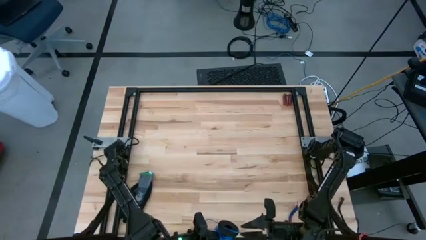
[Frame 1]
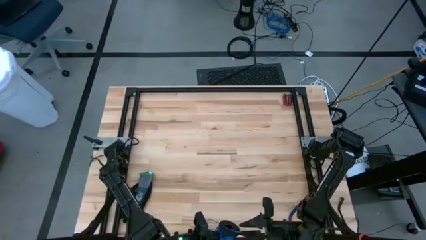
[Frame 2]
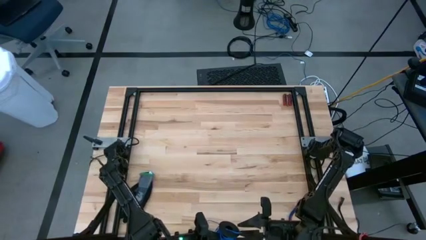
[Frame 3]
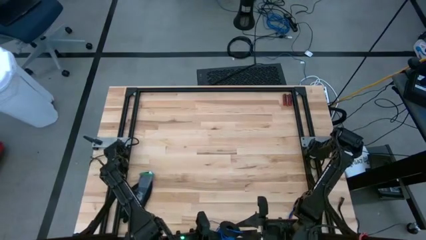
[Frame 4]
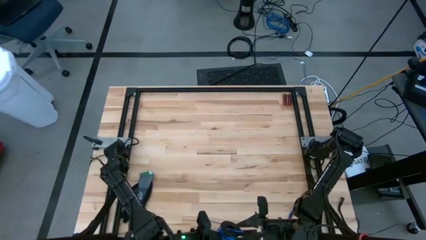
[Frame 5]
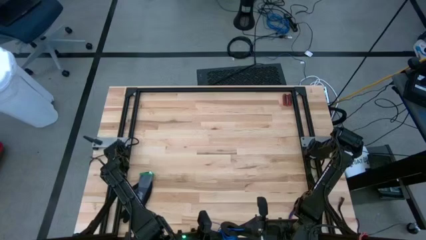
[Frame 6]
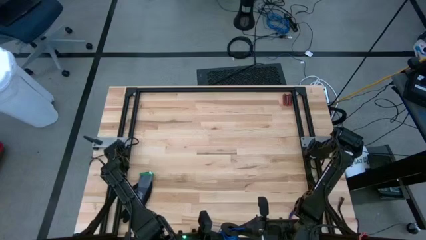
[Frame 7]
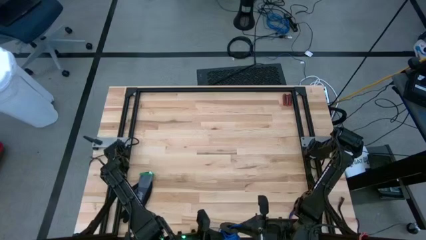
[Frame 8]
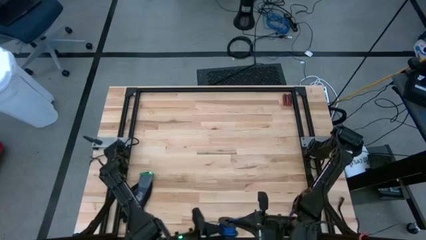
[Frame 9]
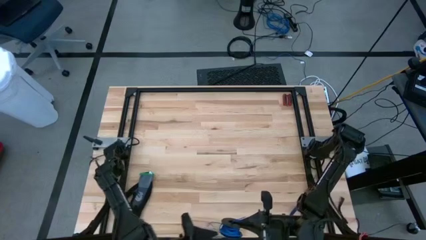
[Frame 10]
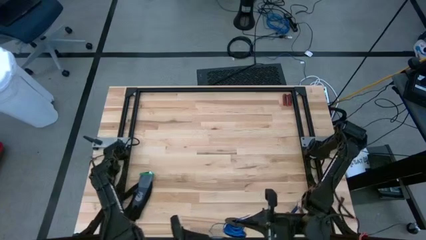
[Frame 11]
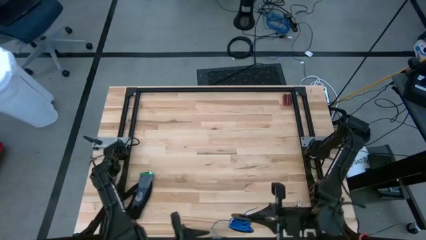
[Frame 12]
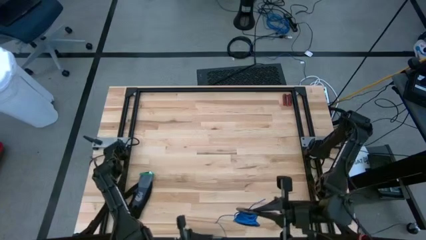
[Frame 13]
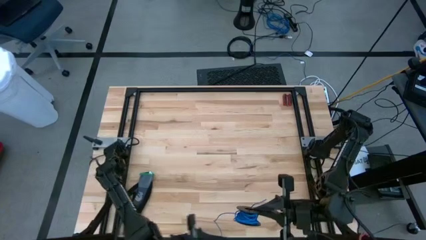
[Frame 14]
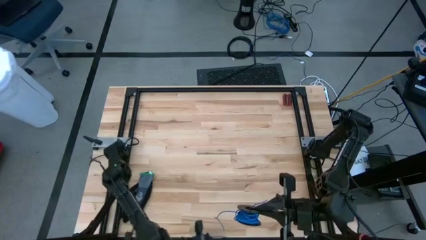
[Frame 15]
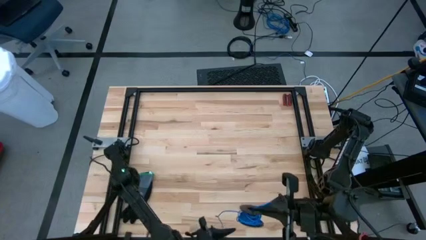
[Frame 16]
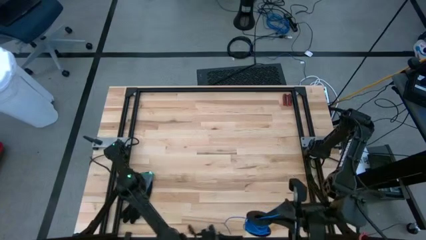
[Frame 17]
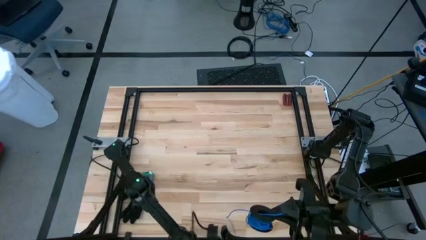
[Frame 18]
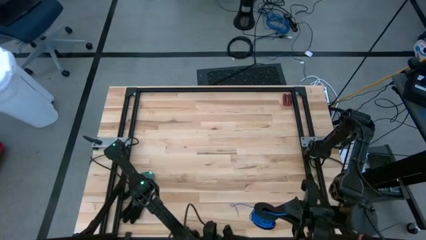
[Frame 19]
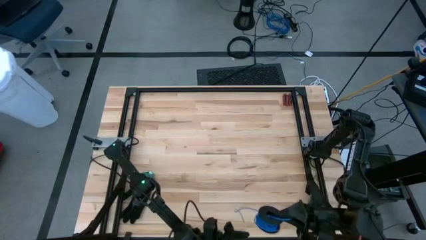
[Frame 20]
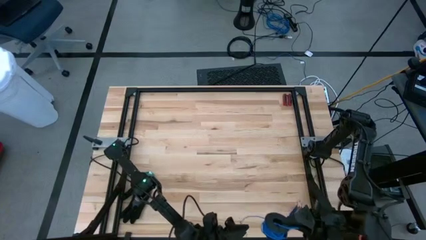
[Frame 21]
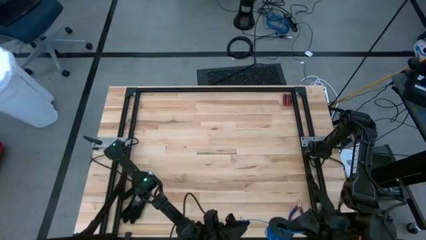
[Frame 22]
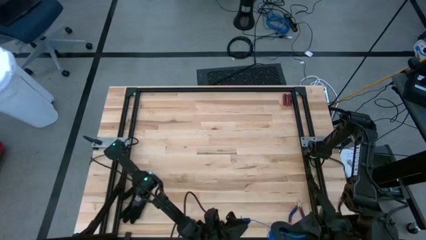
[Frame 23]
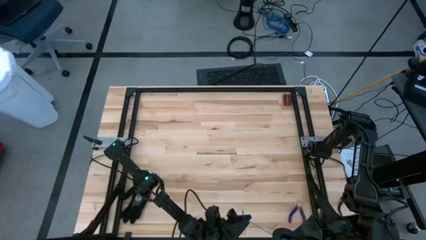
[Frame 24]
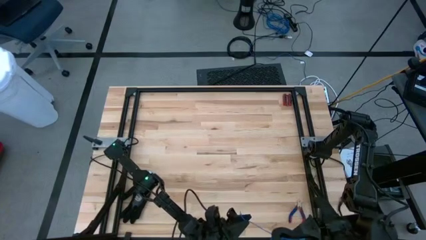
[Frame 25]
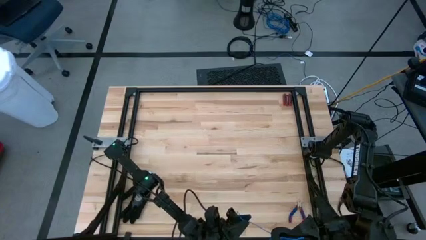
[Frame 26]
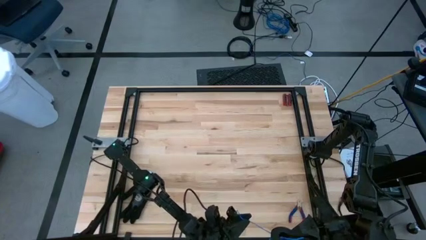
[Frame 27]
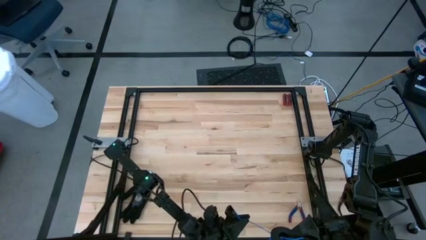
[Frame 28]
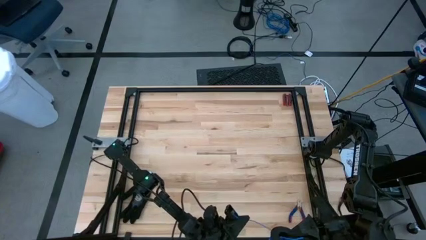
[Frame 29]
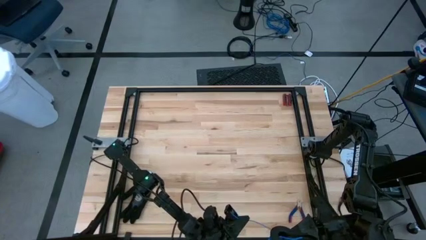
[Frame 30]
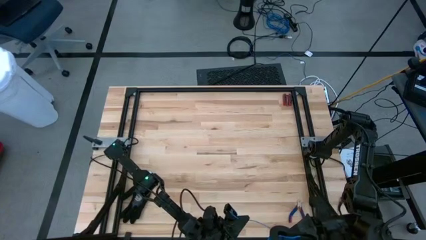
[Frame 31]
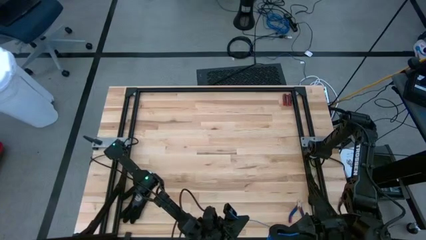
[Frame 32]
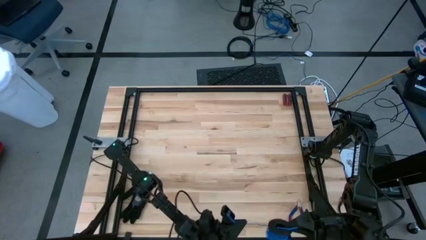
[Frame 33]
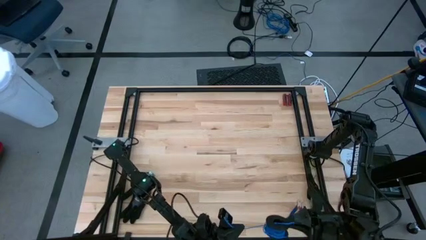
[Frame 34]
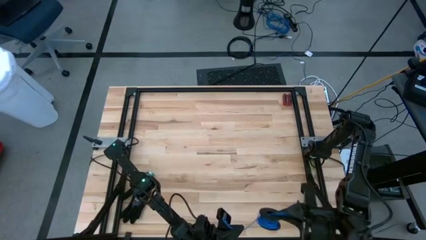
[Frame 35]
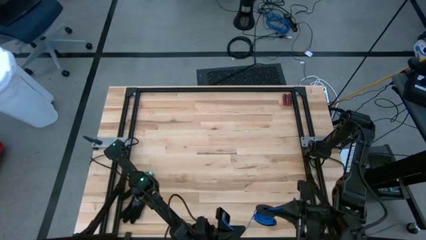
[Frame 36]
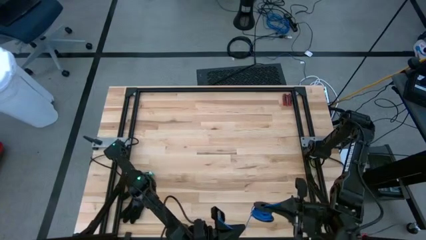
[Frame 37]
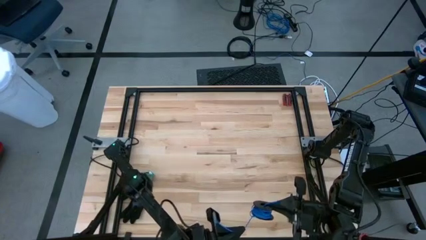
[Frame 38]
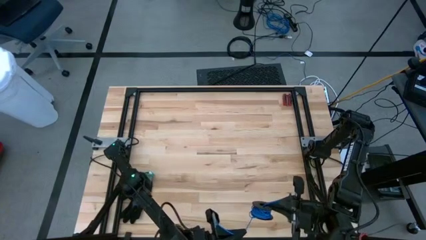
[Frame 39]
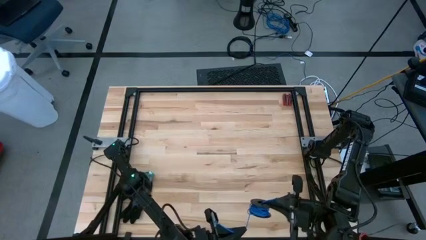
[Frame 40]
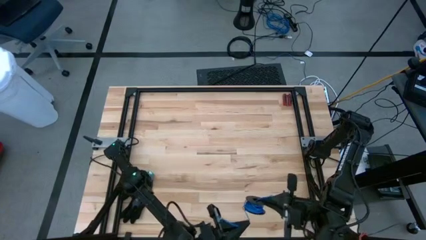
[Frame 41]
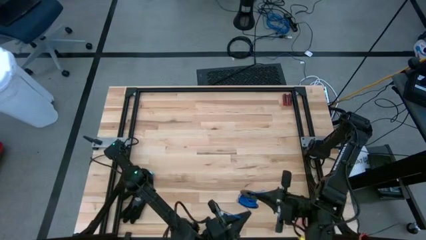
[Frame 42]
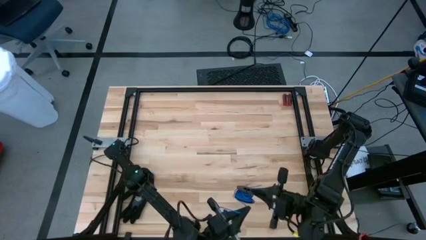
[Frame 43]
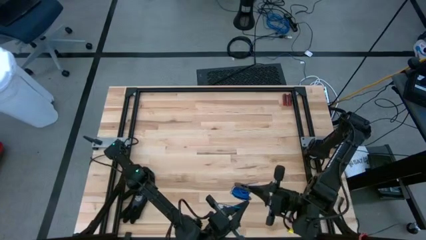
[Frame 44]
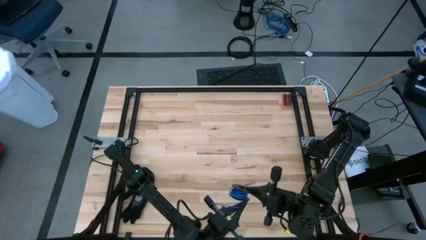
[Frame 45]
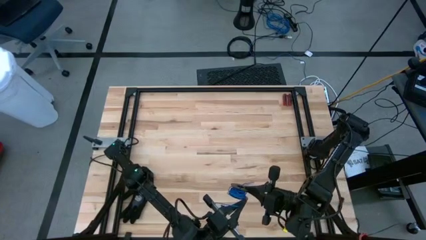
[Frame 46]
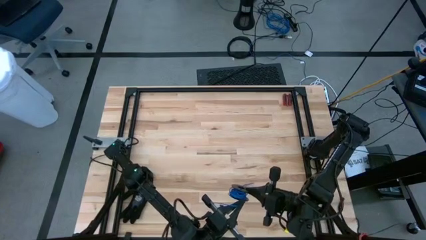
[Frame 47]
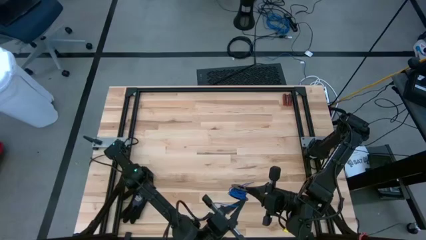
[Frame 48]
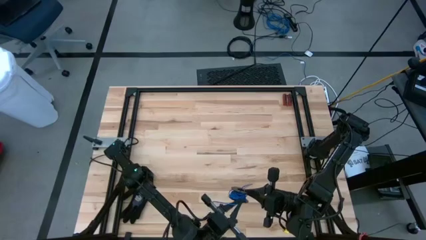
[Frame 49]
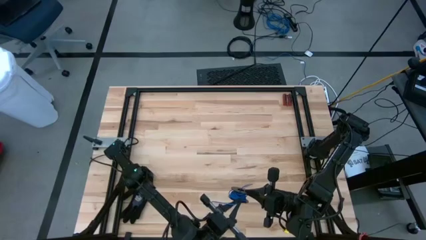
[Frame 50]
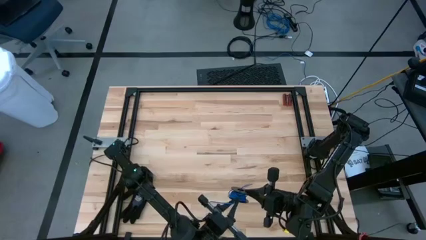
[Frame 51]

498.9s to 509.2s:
Task: Coil cords
Coil the blue wire onto the spool

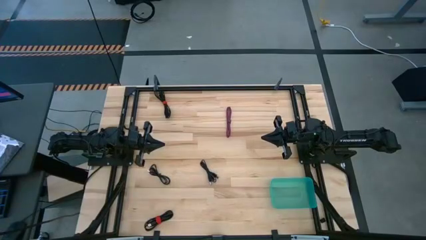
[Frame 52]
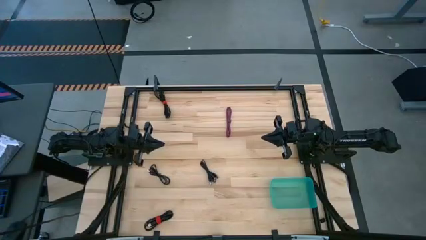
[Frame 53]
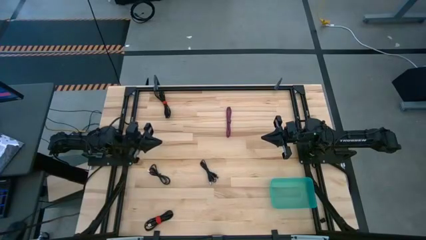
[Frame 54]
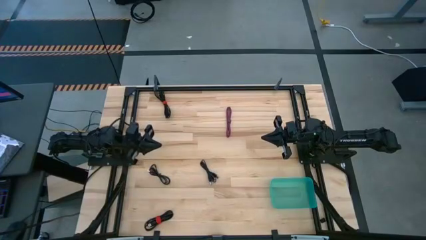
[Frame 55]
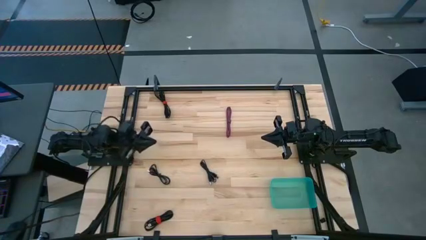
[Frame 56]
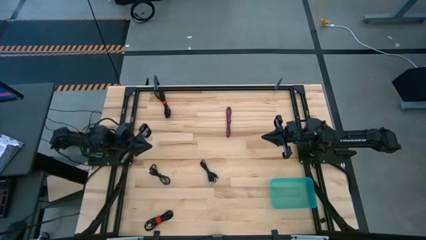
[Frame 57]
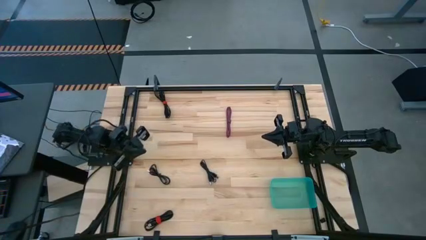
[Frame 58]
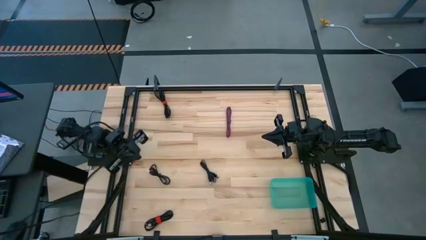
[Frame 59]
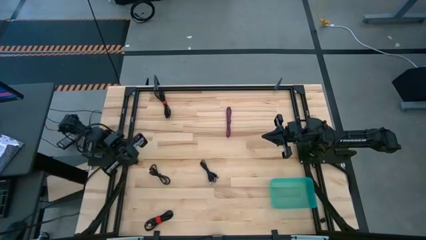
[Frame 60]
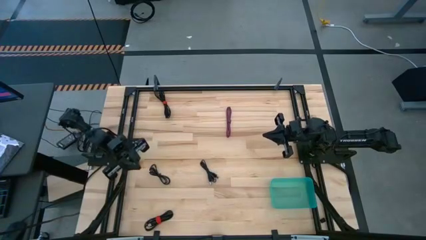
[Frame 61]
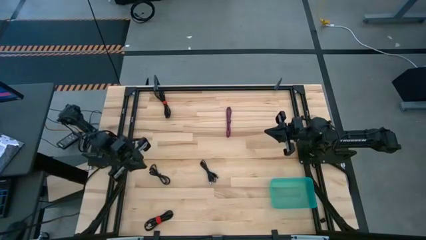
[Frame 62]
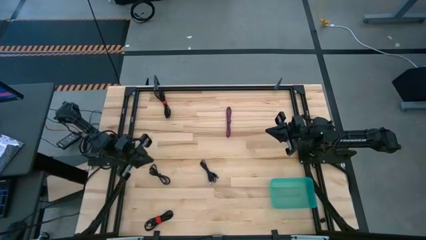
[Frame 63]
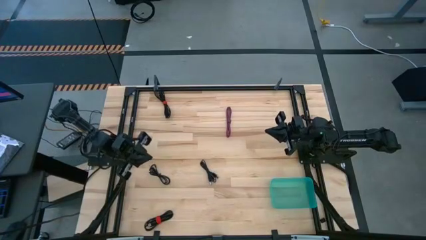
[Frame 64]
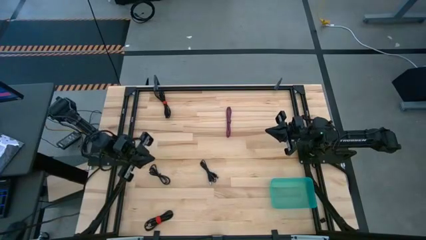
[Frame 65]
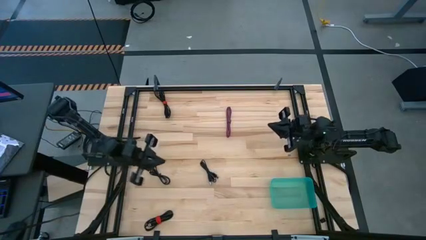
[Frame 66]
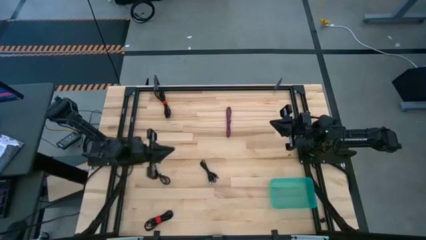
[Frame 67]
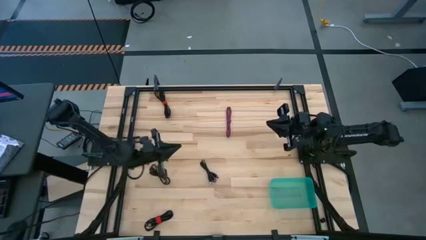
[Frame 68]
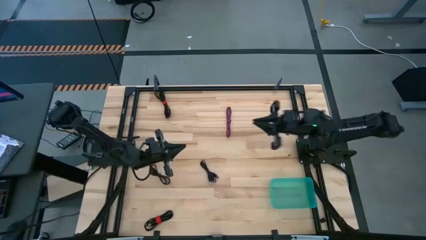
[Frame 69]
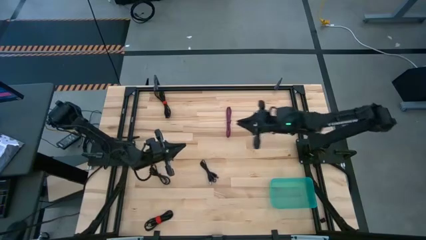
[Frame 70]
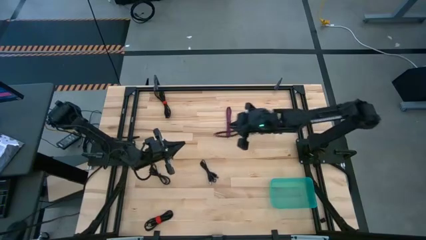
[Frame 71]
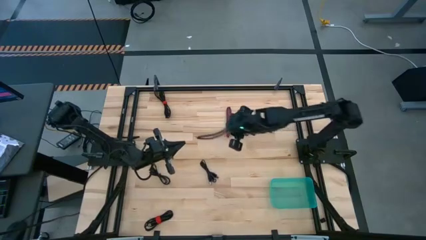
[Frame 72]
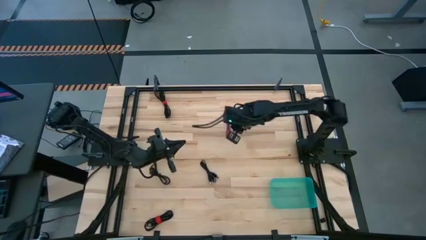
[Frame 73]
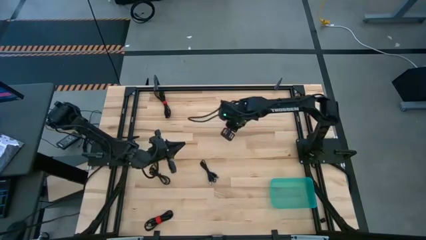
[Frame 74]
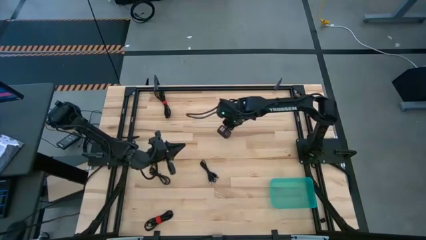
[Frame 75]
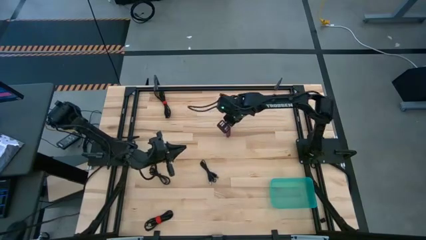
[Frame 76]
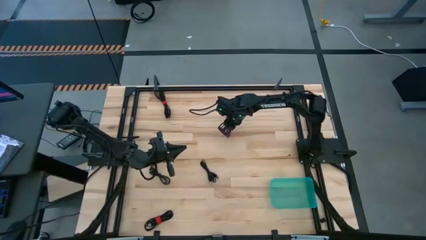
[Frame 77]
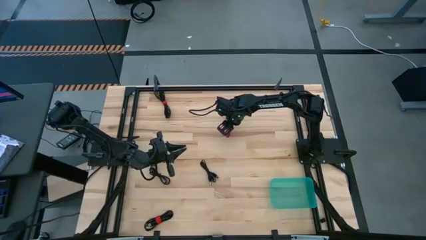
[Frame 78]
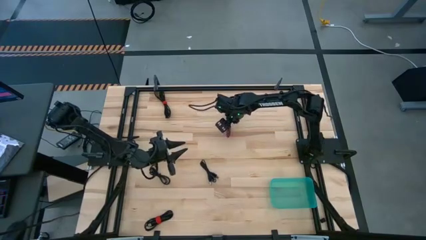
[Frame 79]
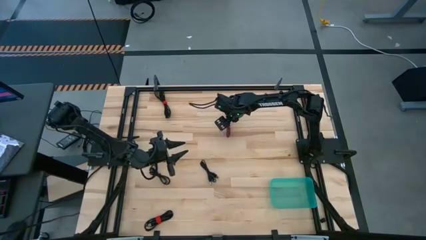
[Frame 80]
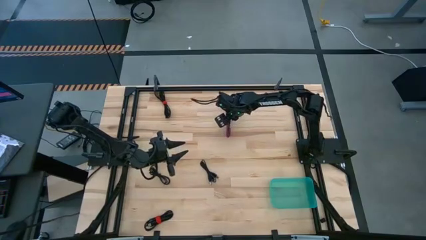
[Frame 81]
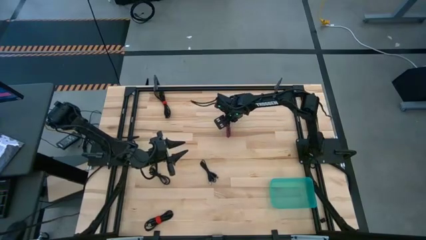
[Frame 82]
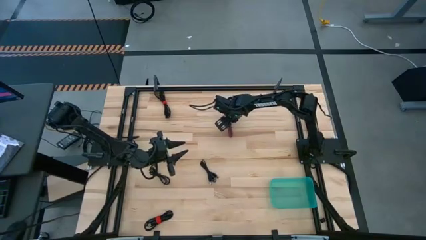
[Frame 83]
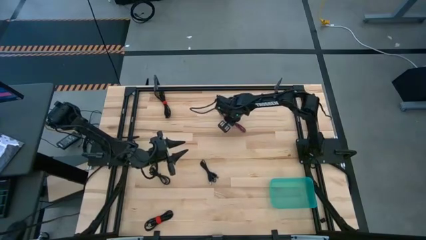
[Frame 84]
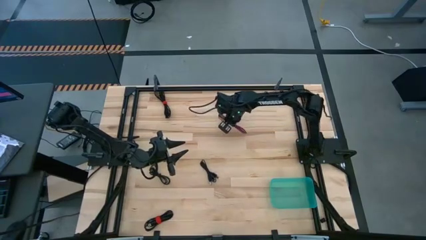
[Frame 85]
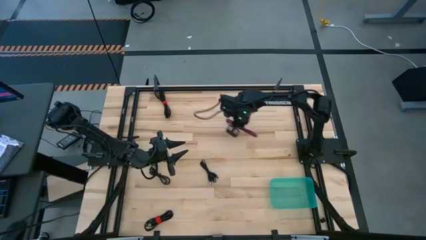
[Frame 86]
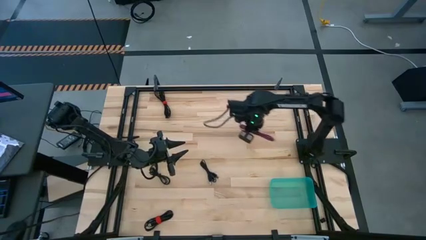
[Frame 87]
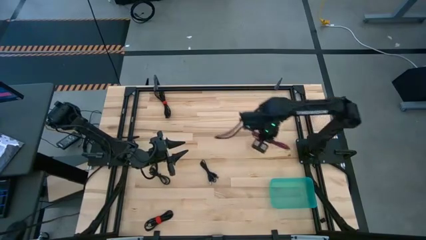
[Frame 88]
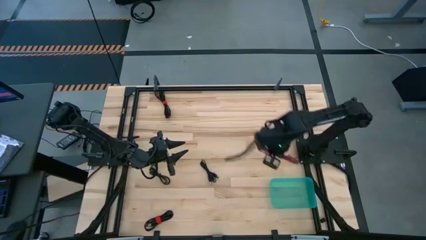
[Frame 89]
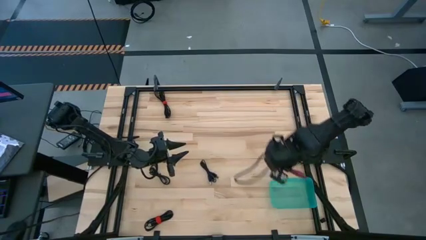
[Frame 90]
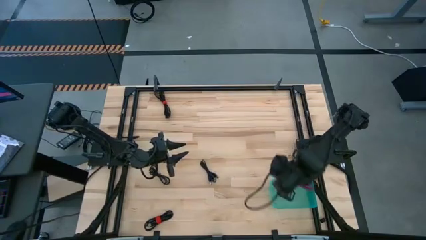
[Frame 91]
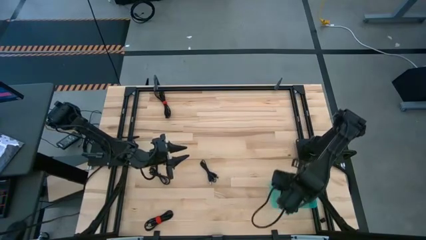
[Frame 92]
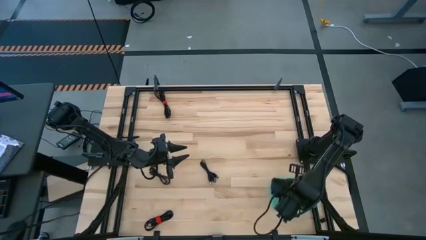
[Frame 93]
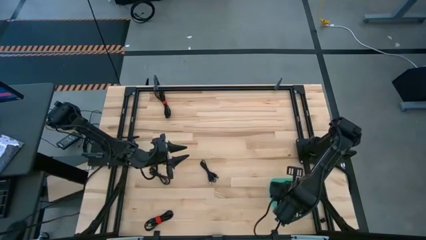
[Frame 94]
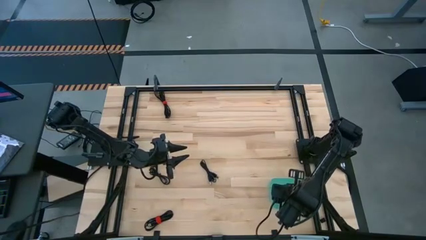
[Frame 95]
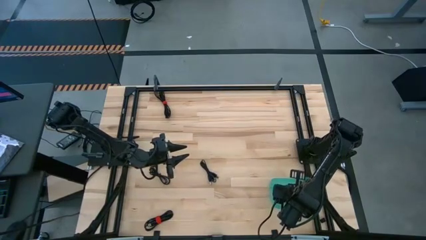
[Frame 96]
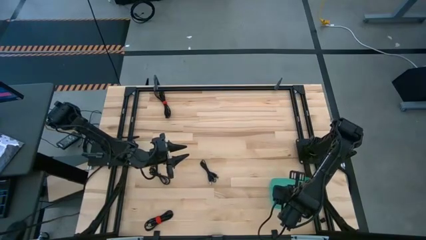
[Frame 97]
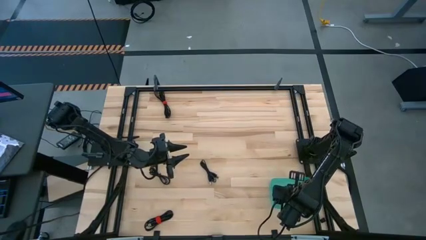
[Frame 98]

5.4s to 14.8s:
Task: Pick and place USB-C Cables
Put the pink charger cable into the green bin
